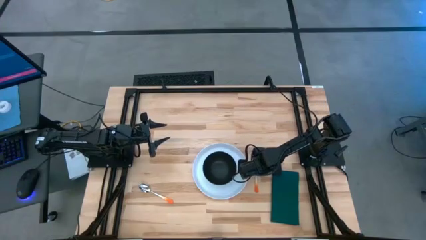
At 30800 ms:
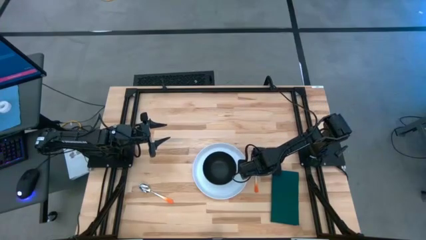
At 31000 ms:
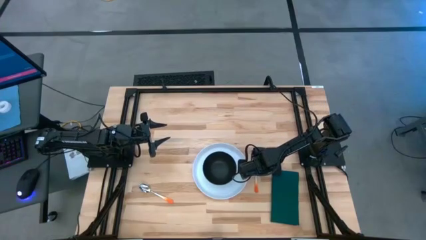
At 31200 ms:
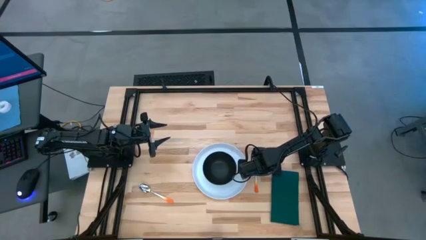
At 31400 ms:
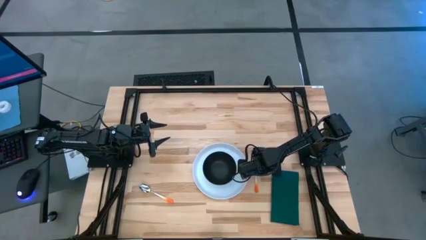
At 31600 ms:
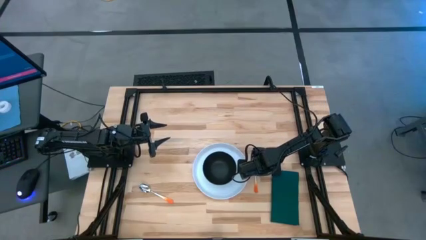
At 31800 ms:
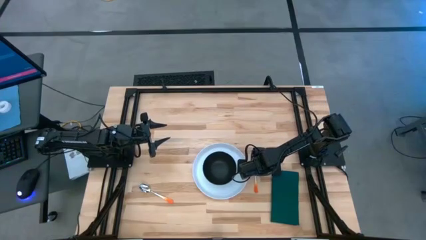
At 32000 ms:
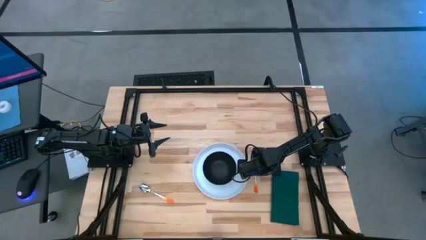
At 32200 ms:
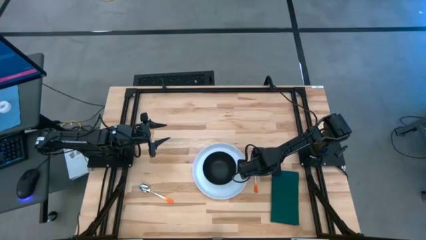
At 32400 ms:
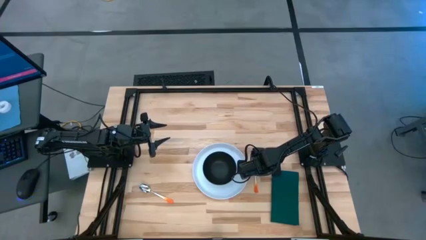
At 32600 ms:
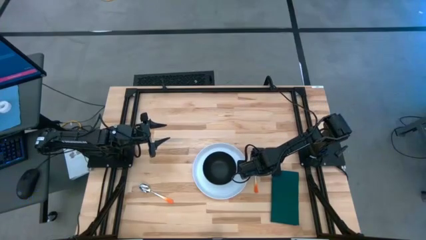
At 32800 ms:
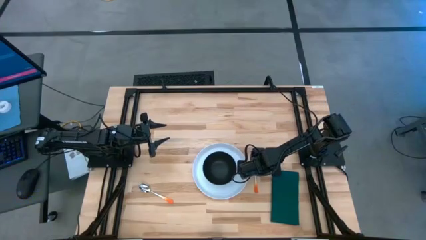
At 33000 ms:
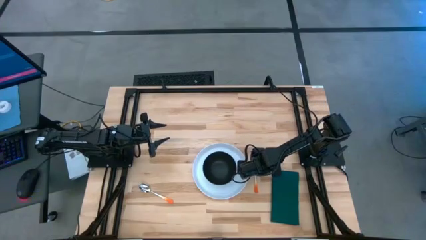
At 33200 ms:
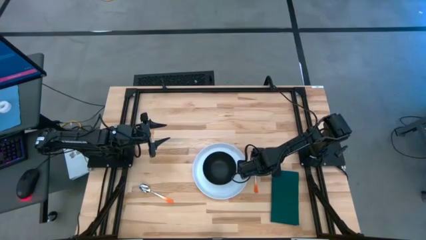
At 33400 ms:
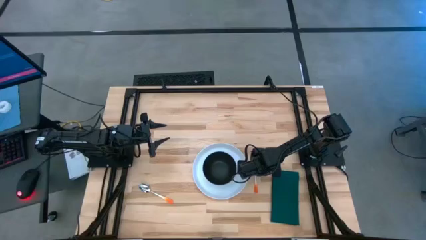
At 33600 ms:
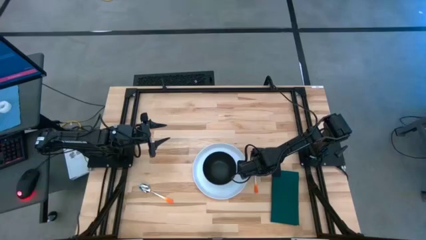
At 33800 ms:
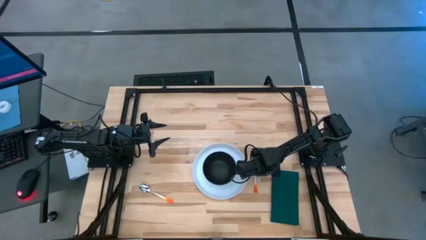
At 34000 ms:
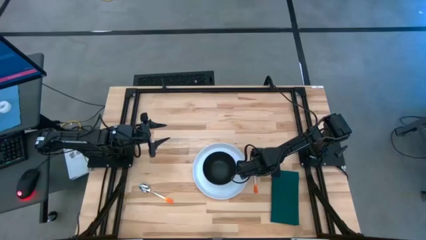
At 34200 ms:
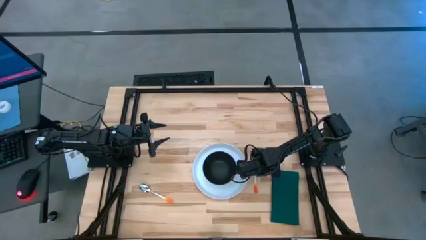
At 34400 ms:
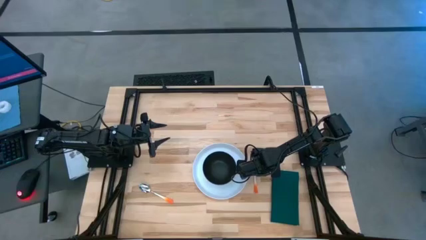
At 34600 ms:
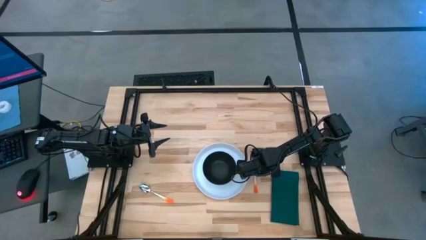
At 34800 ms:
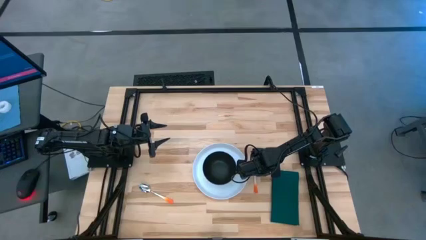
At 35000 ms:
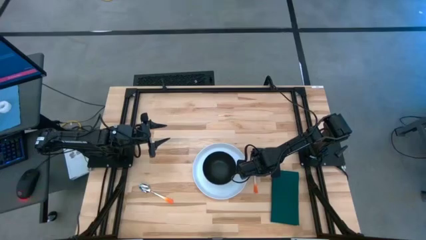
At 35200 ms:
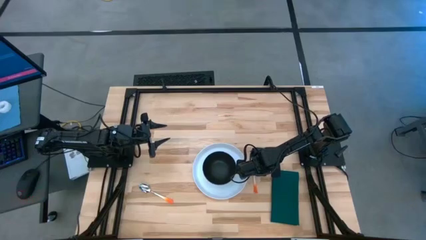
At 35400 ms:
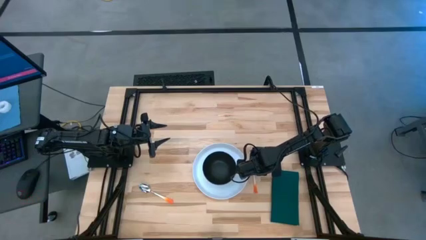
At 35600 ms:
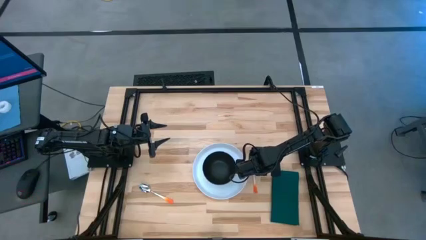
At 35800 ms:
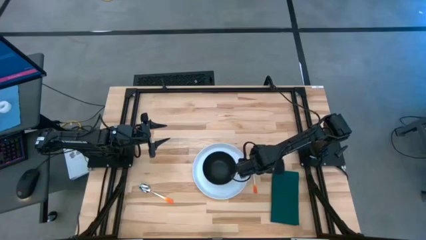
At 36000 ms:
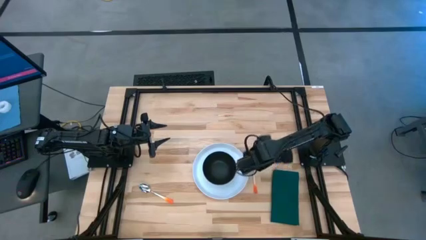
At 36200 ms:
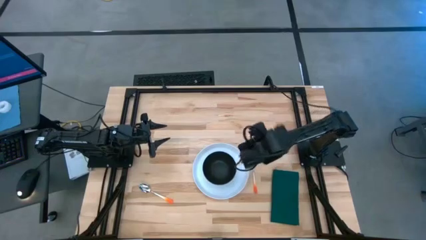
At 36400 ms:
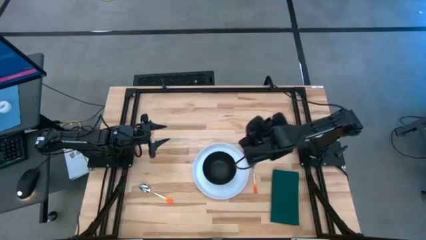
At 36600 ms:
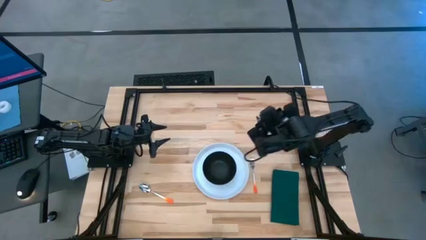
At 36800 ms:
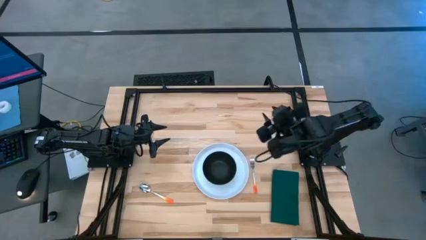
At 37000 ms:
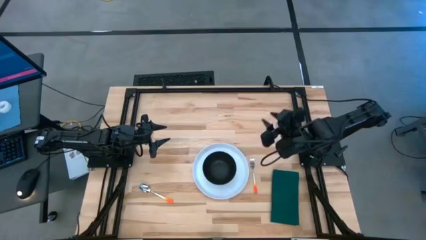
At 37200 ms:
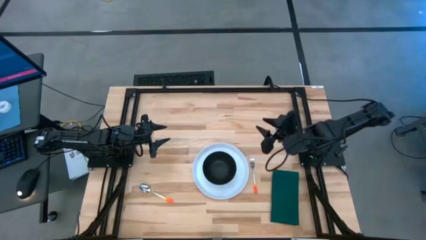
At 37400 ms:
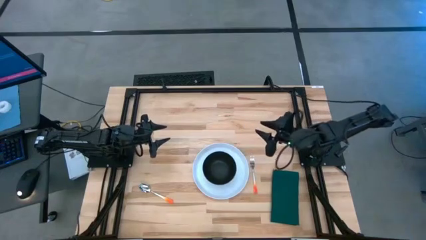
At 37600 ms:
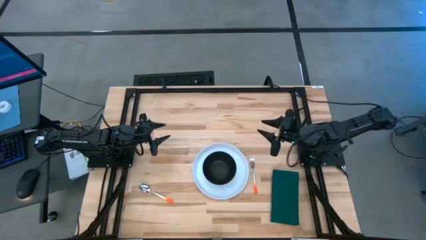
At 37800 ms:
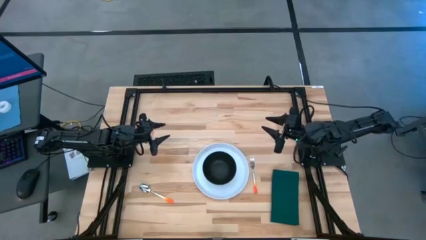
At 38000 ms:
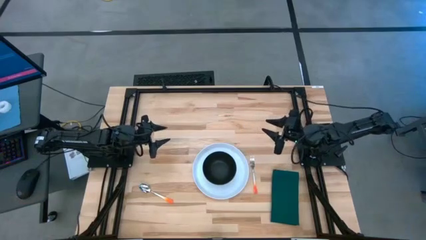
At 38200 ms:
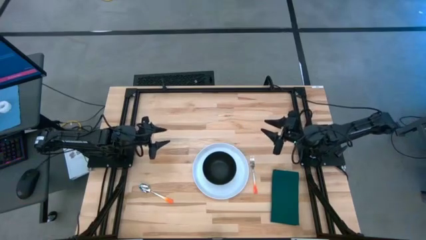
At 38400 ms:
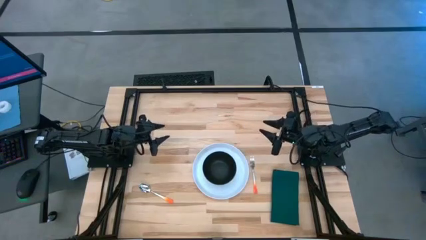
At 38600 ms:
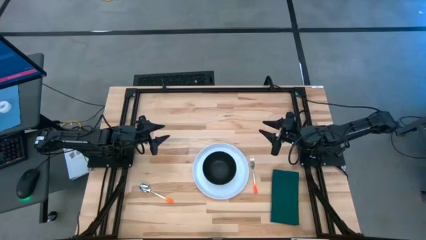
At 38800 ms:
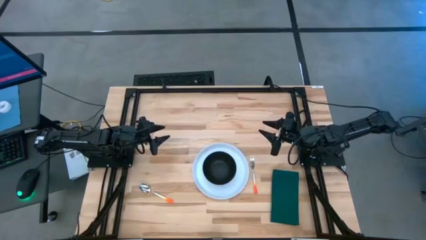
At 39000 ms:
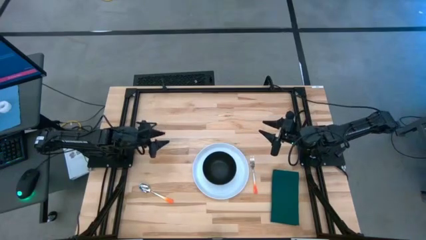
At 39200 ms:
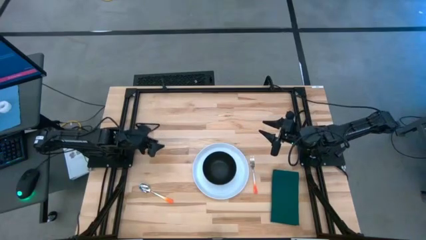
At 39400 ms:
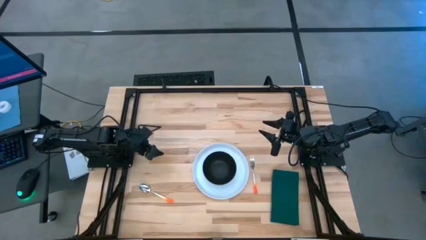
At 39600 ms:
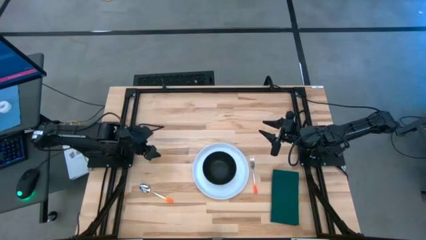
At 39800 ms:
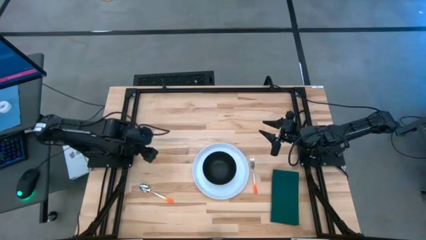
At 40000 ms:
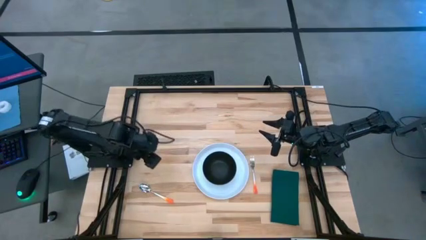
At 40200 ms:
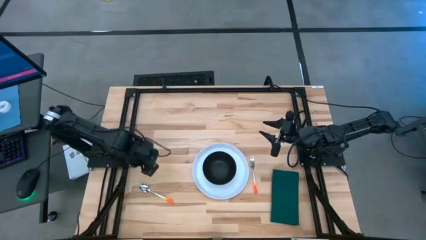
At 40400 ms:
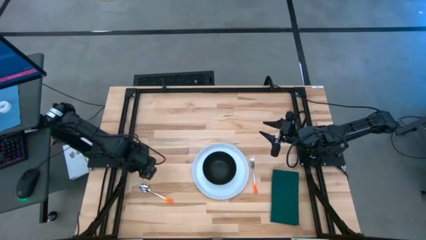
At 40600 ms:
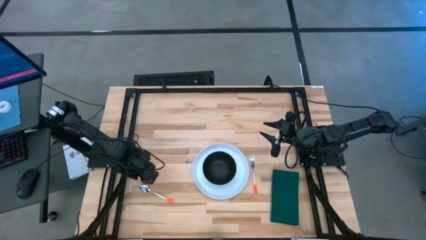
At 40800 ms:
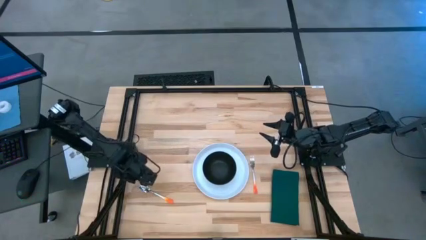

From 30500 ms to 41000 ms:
Task: Set table place
Place the orange-handled fork next to the white plate
